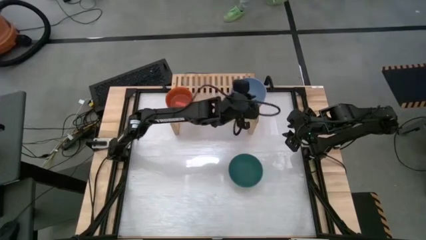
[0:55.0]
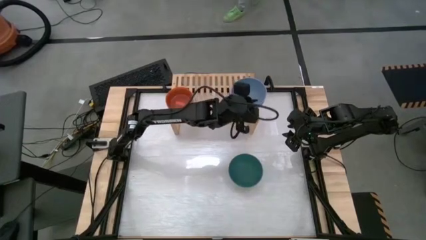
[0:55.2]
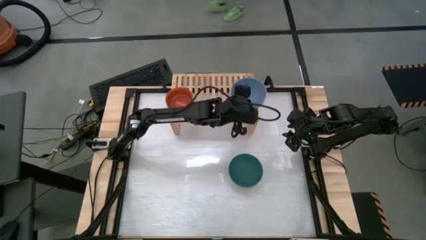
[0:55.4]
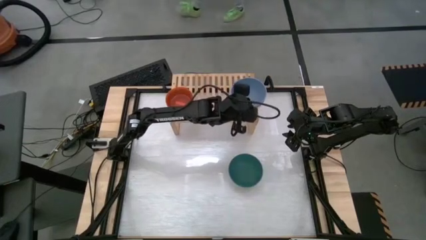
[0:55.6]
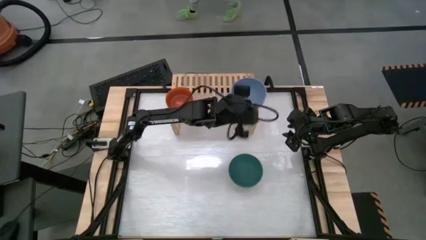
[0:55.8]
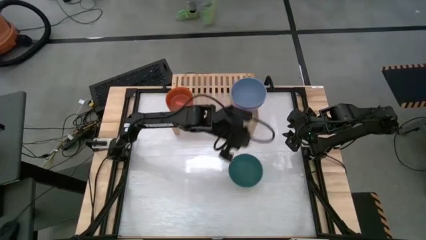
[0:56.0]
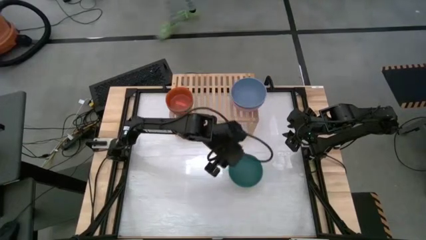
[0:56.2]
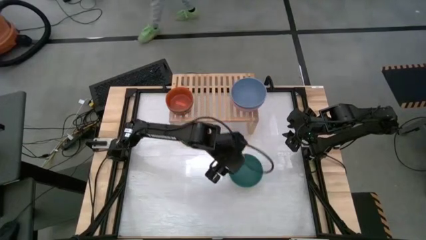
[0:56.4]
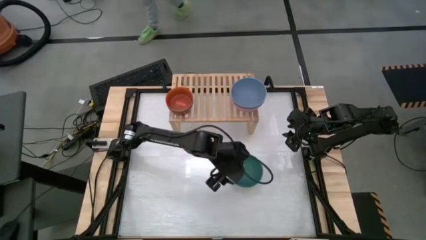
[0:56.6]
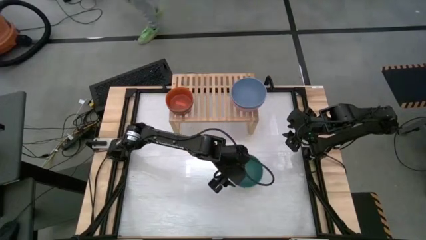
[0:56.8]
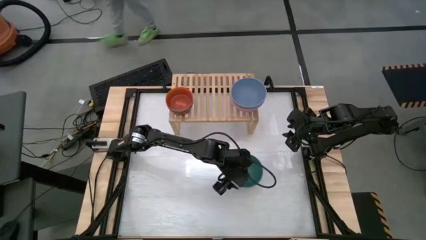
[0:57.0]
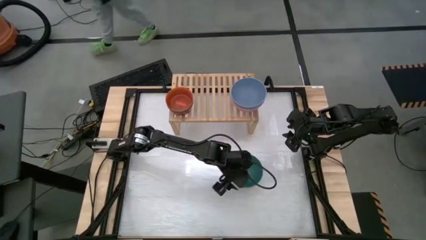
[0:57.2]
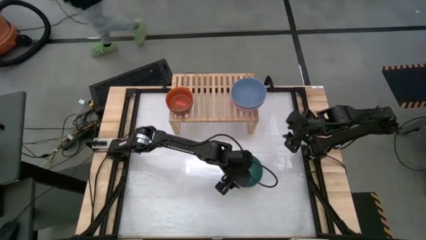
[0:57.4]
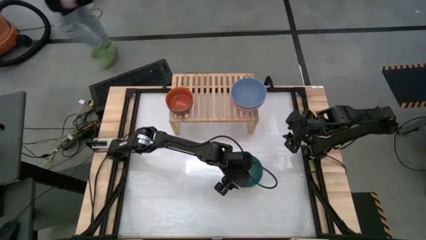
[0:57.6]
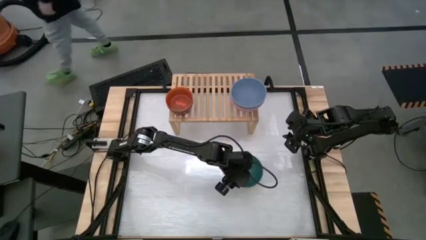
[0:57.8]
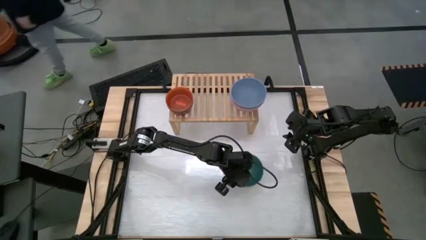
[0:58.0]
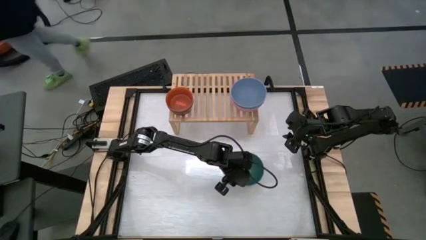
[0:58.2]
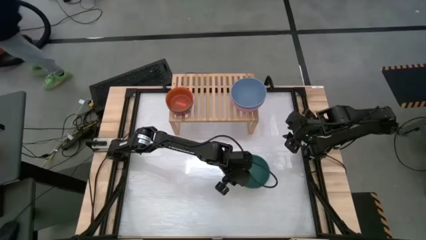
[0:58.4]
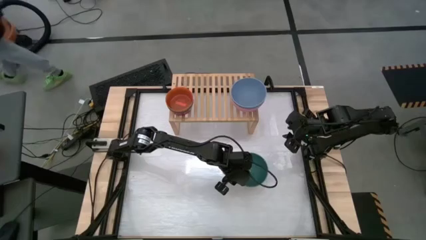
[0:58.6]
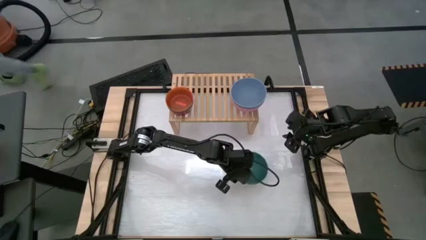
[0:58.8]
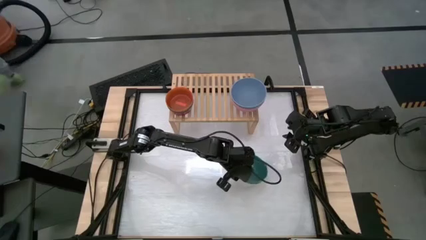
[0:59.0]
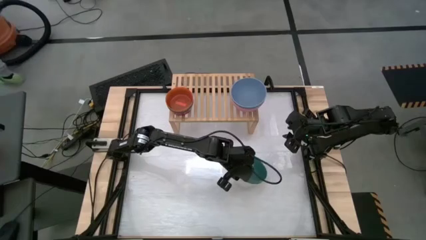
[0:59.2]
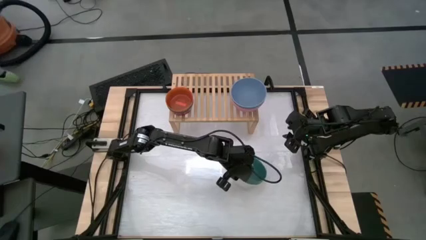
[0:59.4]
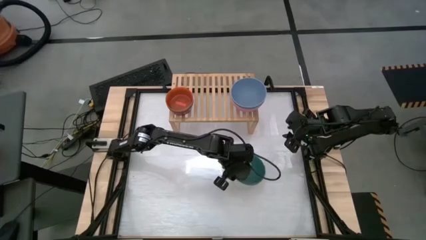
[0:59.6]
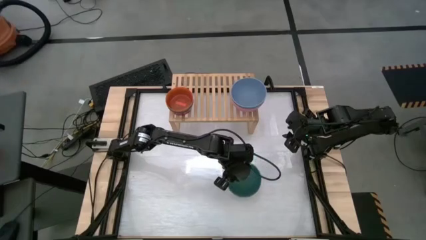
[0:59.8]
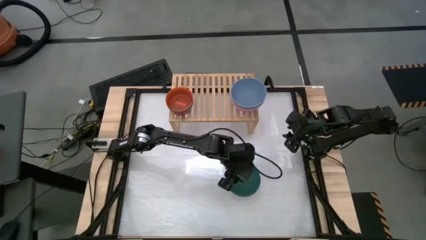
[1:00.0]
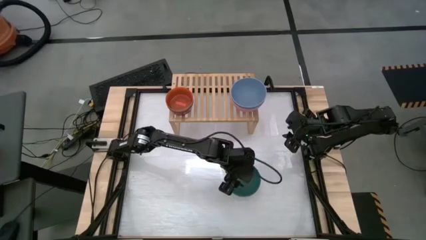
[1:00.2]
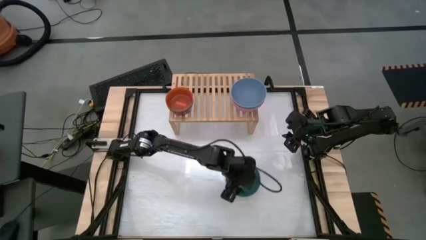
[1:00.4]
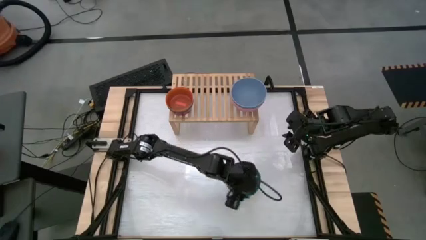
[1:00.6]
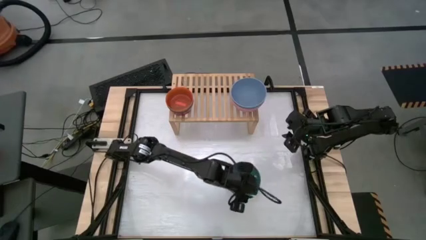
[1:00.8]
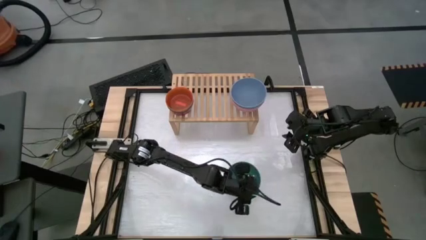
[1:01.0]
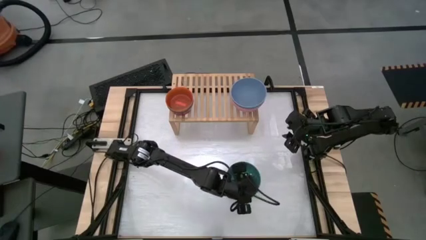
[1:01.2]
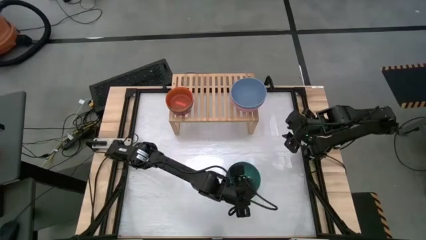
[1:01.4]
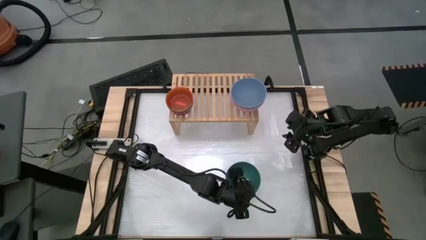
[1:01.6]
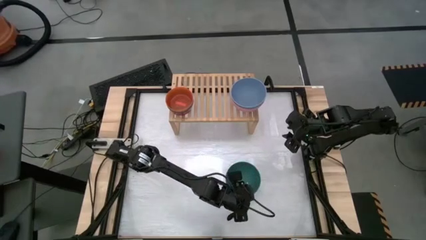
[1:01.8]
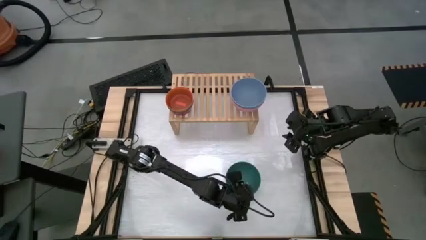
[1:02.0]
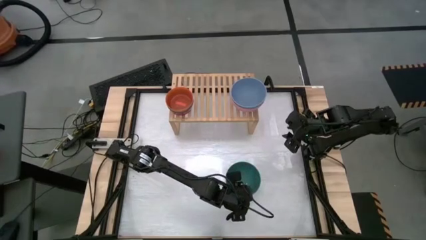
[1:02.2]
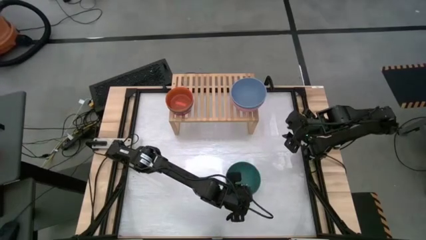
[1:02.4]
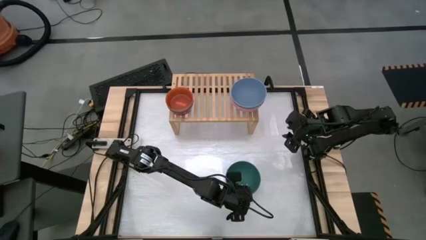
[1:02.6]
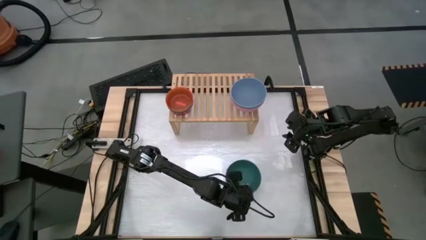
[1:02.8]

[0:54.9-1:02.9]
Task: Place and stack bowls onto a shelf
Stack the dark green bowl on top of the light blue bowl on the shelf

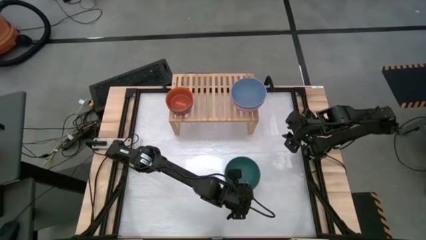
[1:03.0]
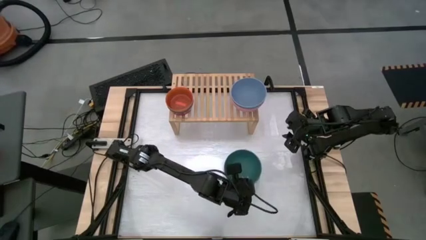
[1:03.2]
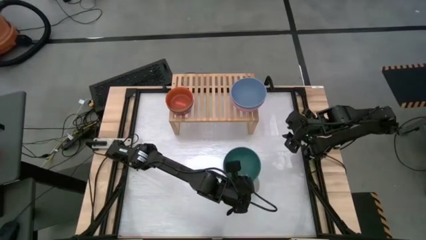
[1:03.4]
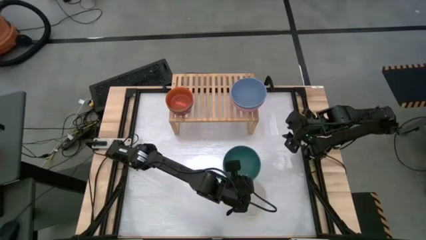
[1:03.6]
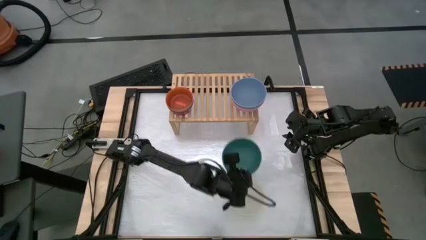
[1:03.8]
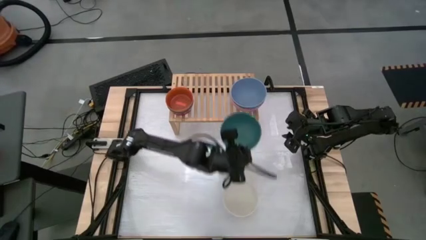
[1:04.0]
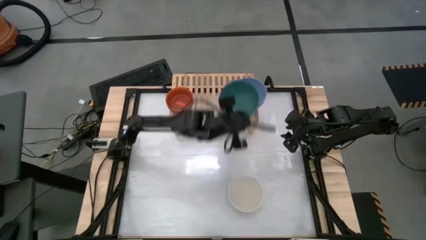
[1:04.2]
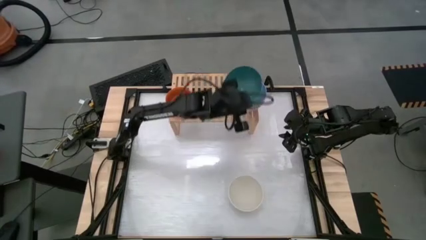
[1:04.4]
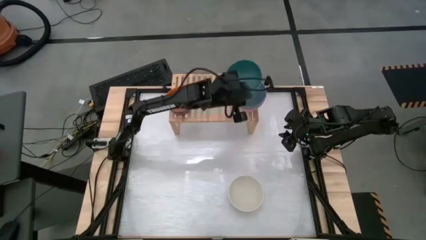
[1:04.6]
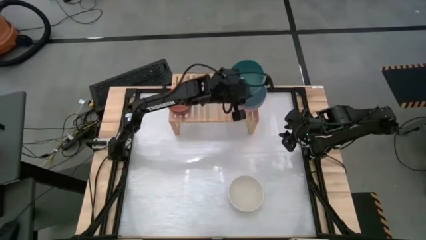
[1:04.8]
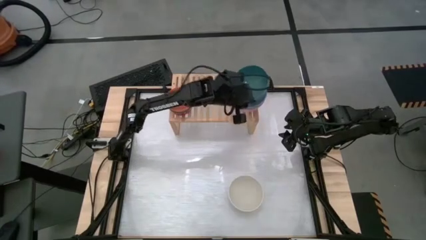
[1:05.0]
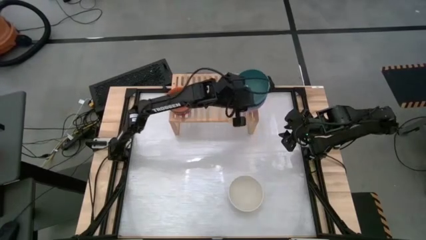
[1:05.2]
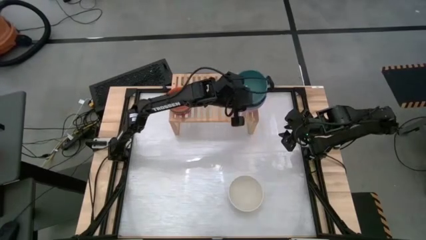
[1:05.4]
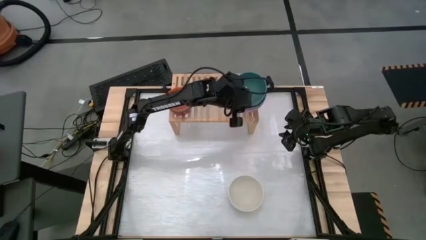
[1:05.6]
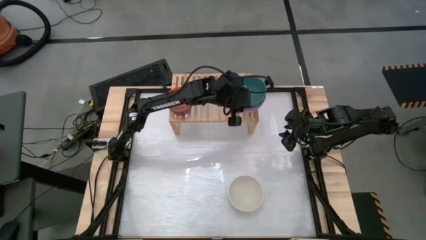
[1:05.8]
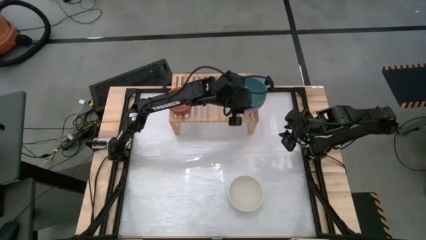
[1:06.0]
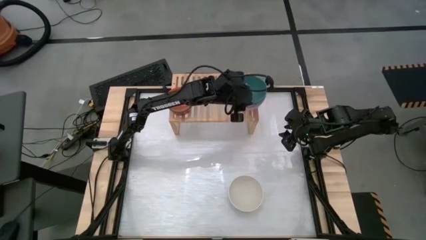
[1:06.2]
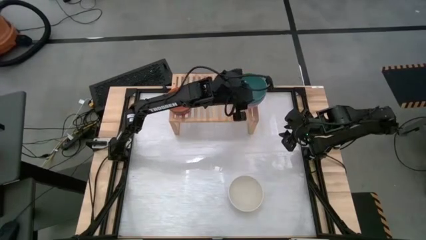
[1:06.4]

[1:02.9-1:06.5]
Stack the dark green bowl on top of the light blue bowl on the shelf

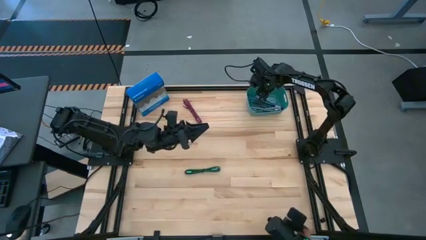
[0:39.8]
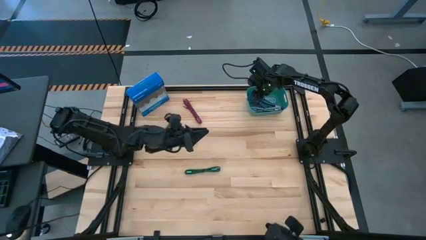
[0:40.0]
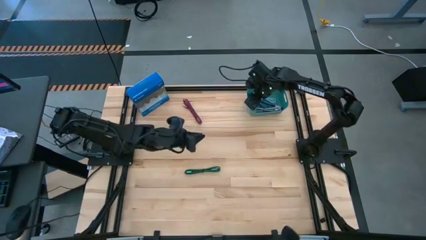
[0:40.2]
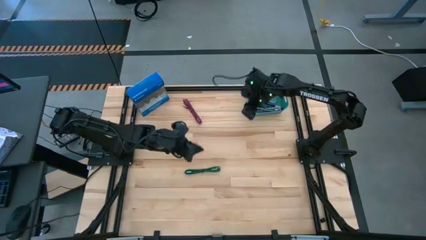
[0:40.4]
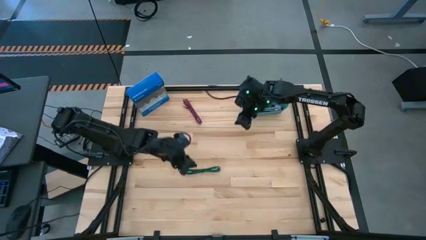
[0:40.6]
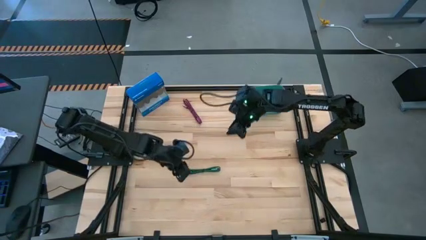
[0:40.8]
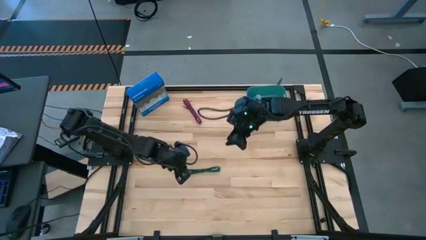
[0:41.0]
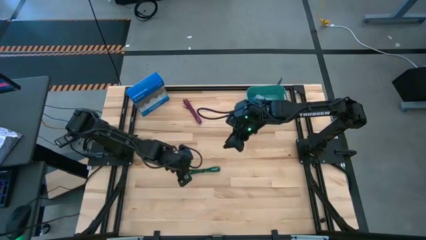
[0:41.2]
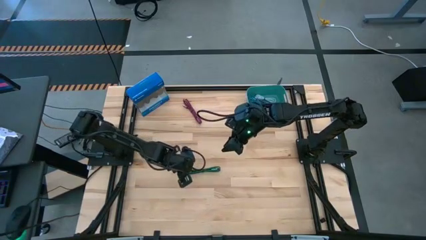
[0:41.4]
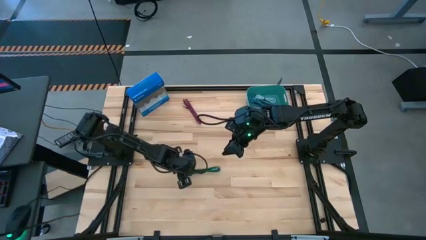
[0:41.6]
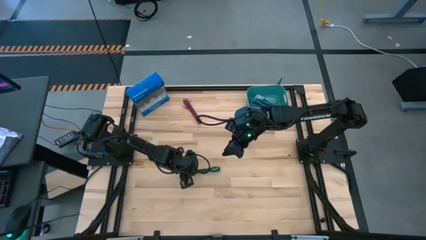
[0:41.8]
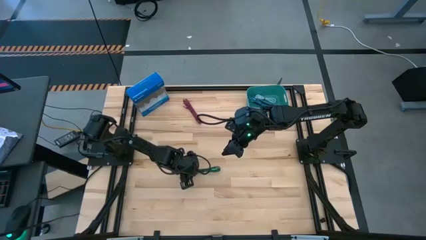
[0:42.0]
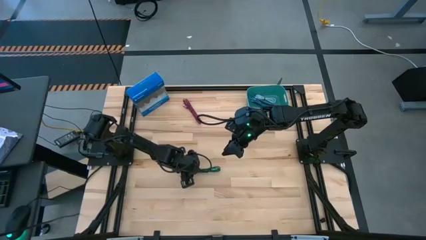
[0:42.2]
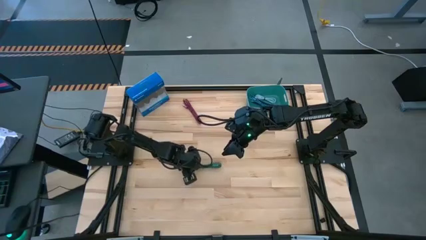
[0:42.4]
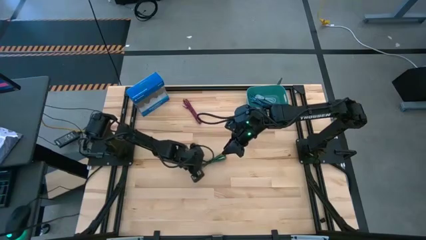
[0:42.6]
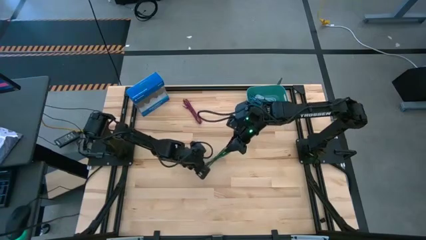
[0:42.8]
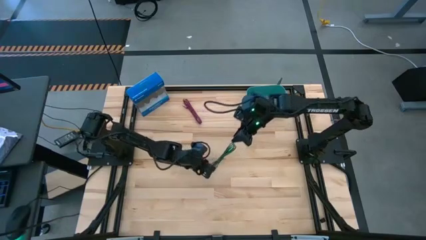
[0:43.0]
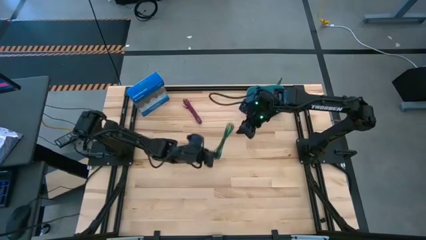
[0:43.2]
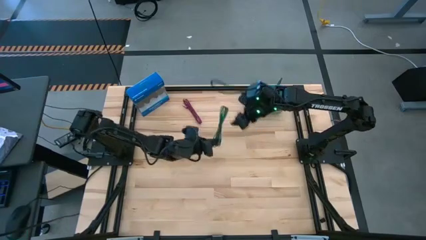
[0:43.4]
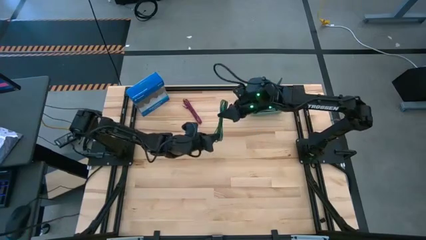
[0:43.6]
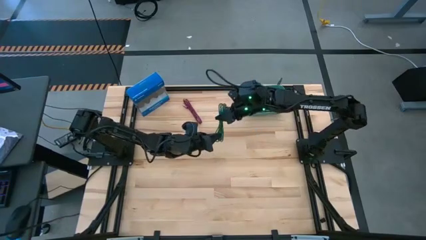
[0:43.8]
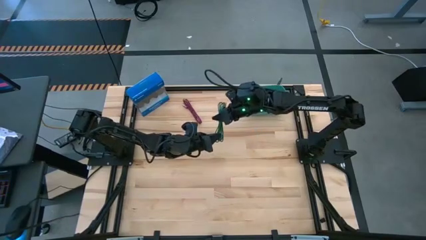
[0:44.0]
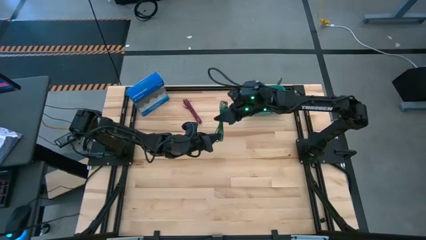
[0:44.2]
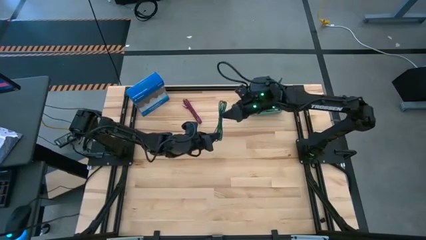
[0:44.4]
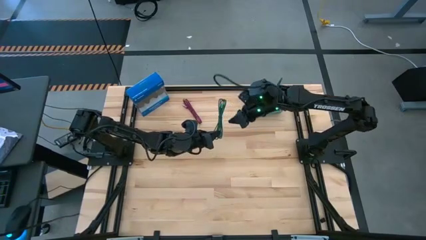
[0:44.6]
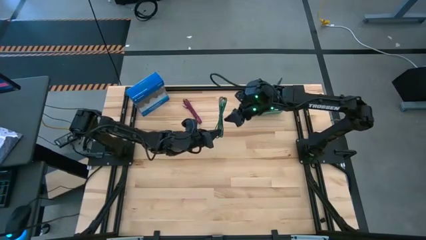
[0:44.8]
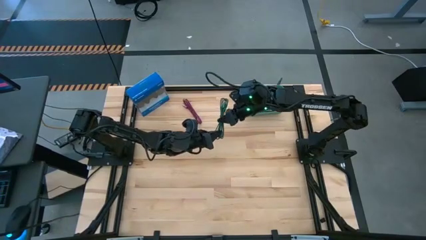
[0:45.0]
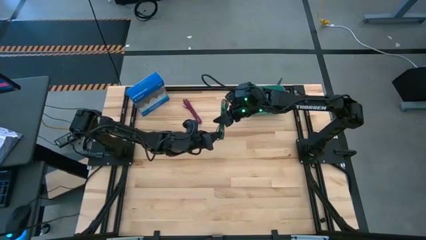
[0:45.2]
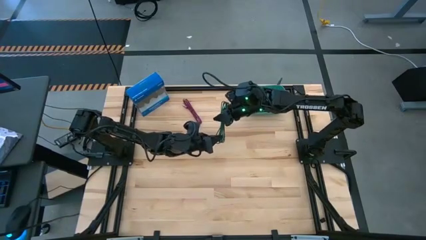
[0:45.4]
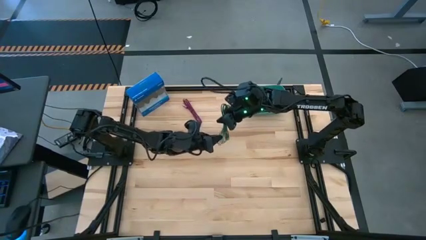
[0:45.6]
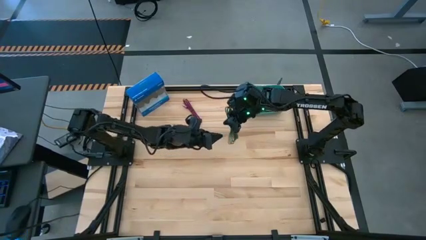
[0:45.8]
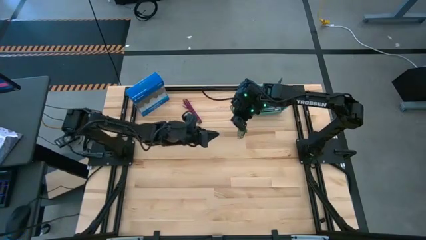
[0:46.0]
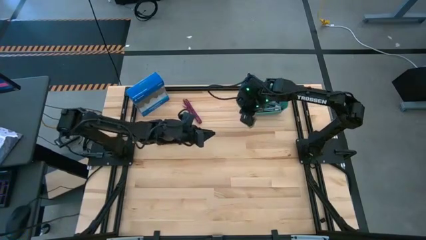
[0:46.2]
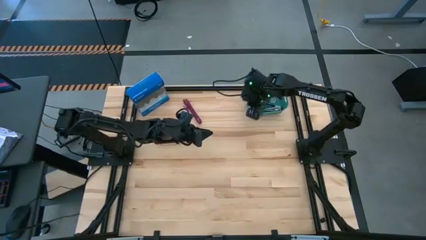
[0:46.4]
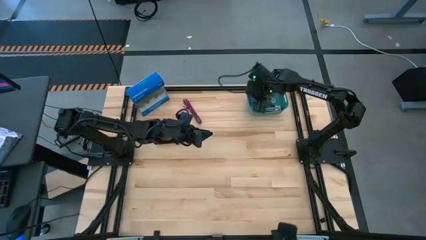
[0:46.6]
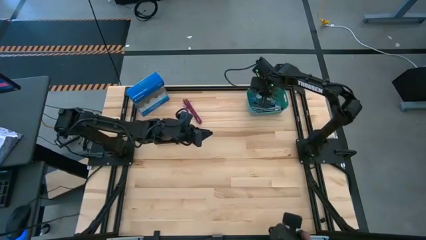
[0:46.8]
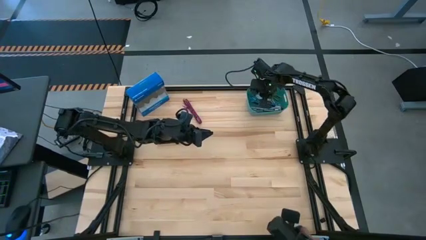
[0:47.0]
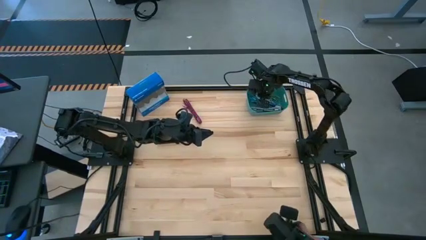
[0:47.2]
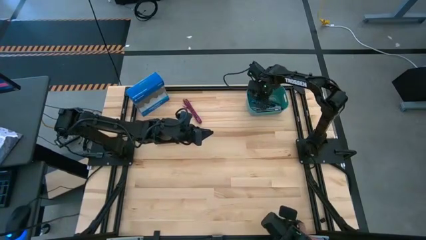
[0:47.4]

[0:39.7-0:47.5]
Task: Pick and place USB-C Cables
Put the green charger cable into the green bin
